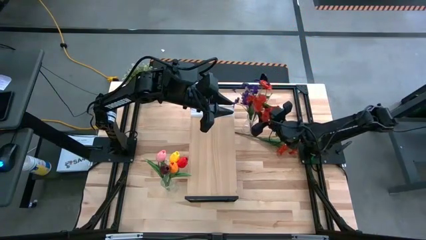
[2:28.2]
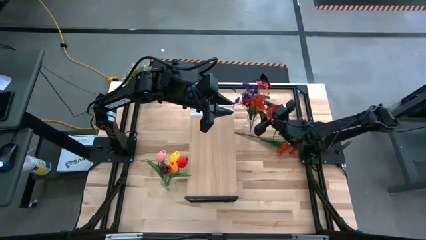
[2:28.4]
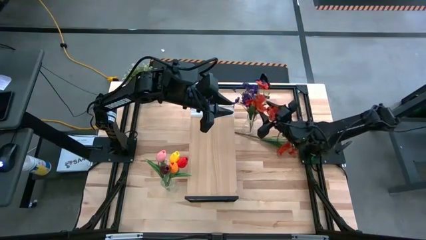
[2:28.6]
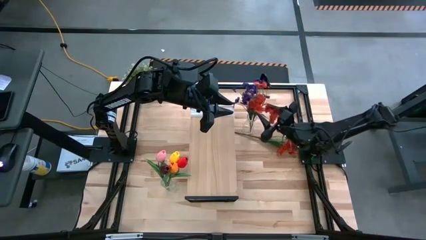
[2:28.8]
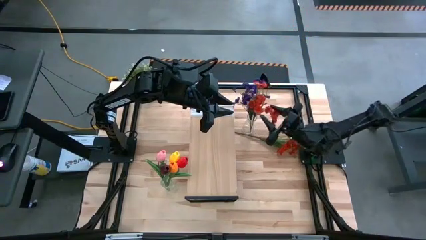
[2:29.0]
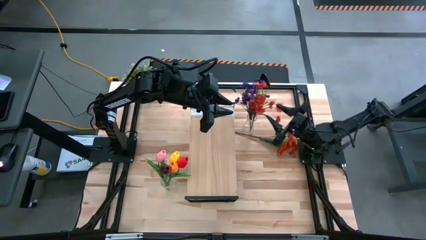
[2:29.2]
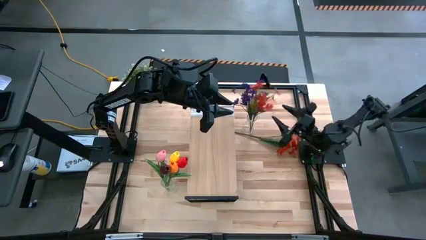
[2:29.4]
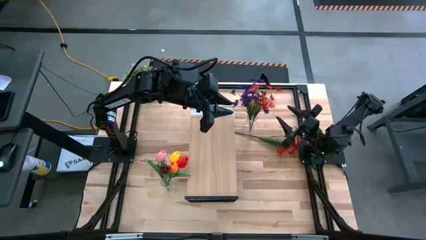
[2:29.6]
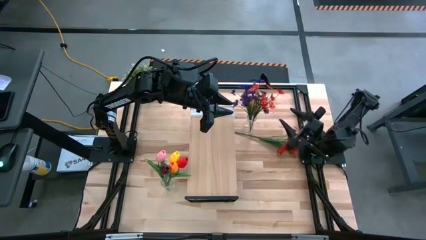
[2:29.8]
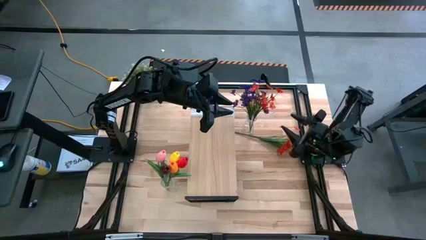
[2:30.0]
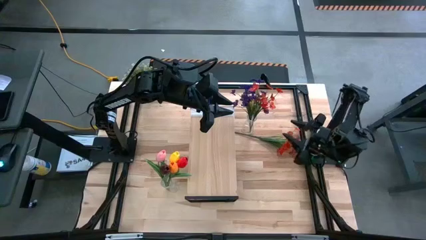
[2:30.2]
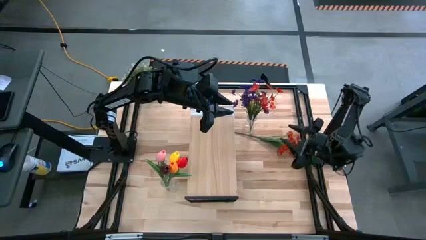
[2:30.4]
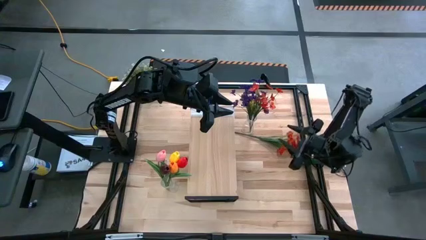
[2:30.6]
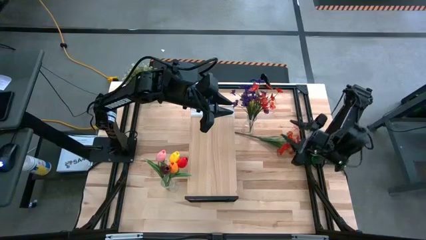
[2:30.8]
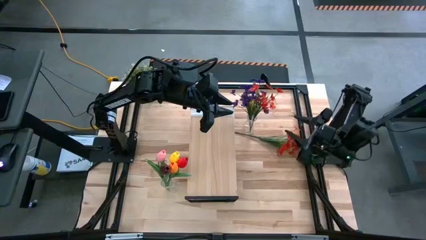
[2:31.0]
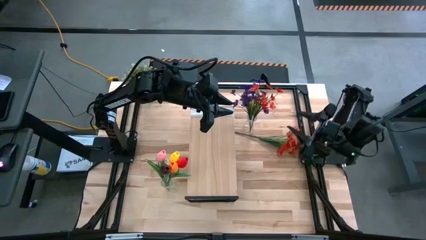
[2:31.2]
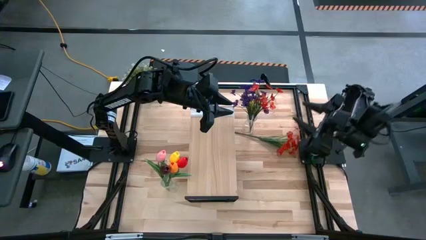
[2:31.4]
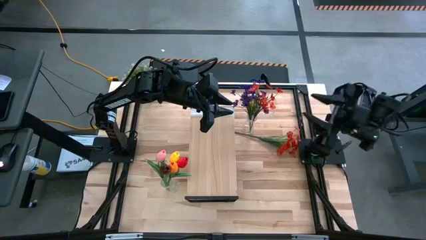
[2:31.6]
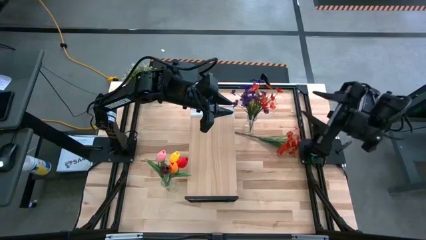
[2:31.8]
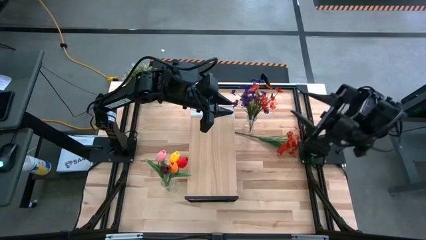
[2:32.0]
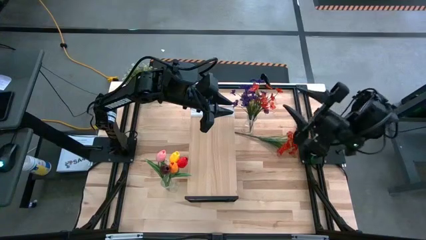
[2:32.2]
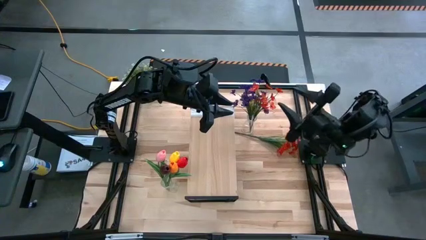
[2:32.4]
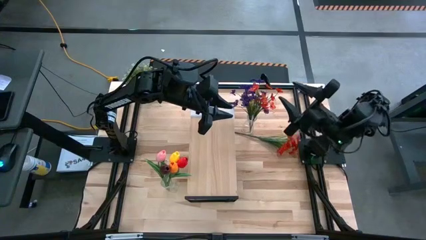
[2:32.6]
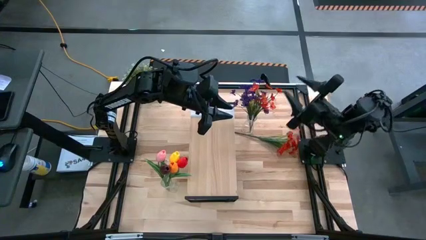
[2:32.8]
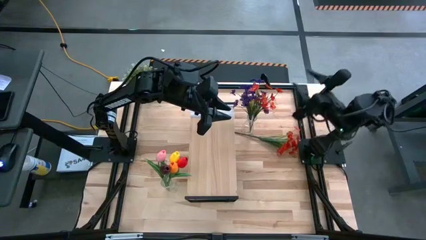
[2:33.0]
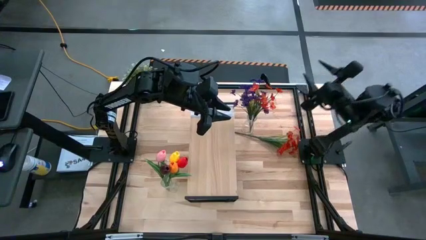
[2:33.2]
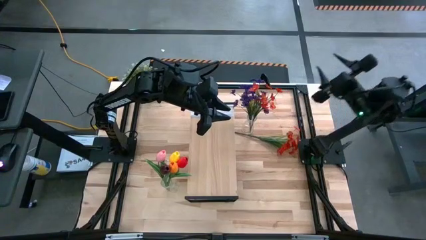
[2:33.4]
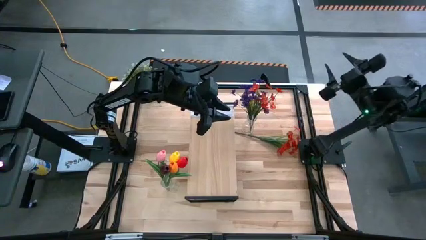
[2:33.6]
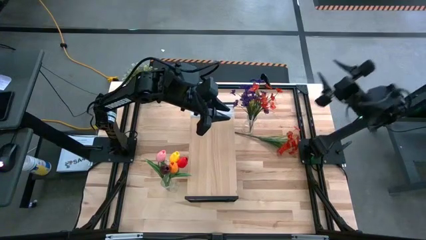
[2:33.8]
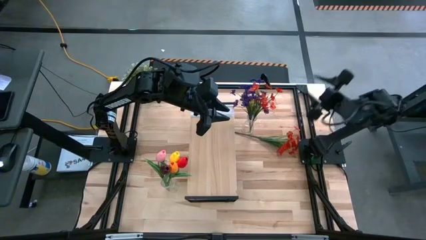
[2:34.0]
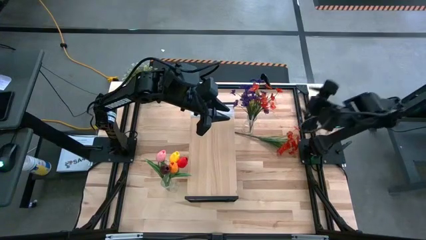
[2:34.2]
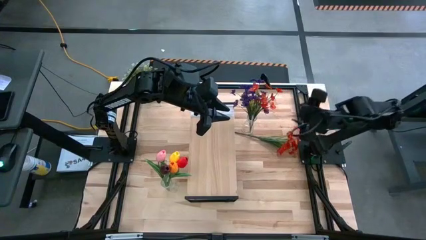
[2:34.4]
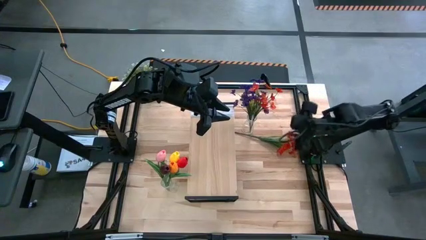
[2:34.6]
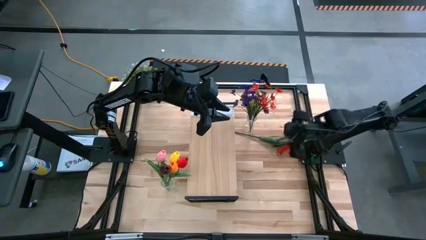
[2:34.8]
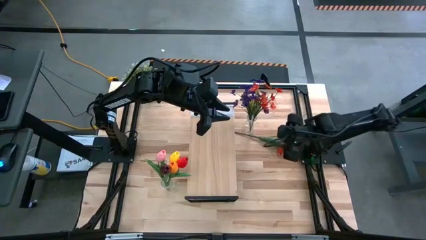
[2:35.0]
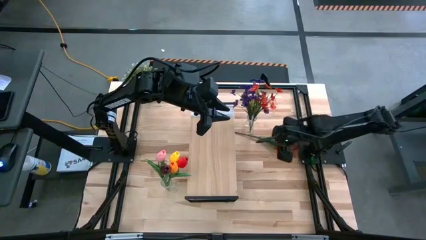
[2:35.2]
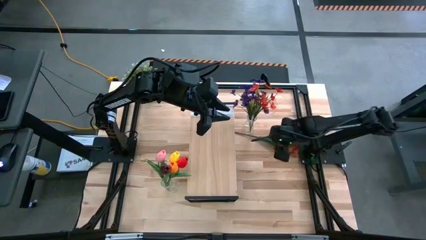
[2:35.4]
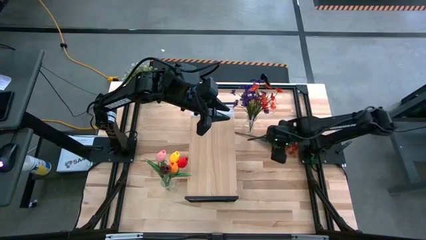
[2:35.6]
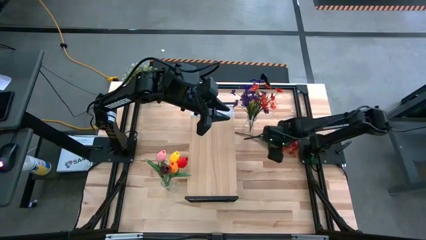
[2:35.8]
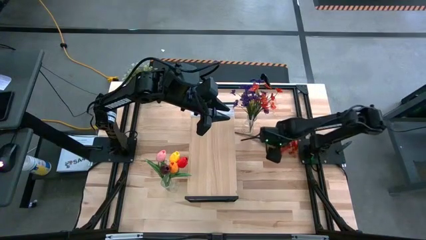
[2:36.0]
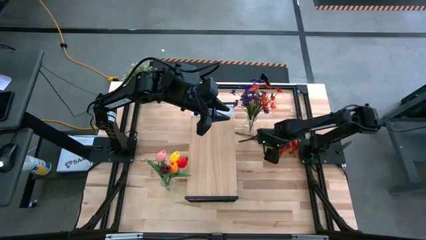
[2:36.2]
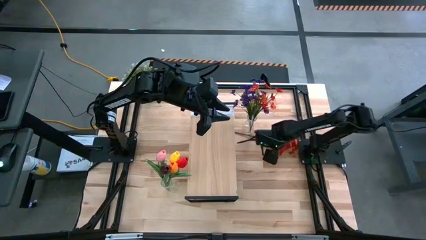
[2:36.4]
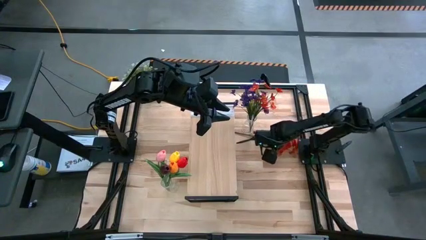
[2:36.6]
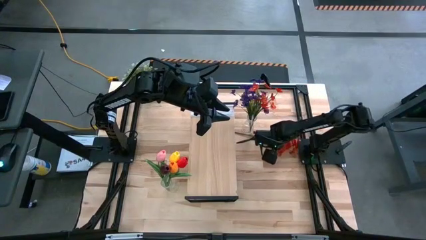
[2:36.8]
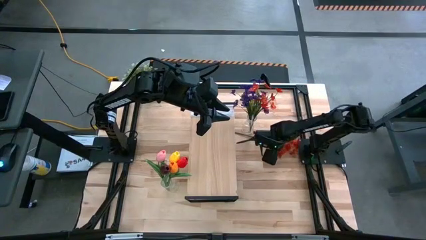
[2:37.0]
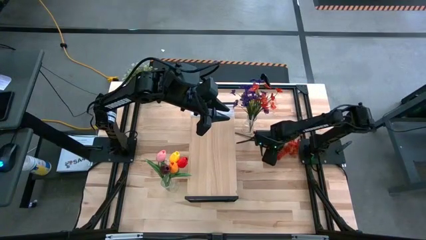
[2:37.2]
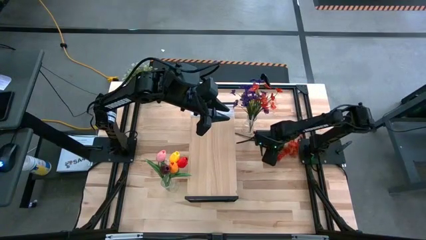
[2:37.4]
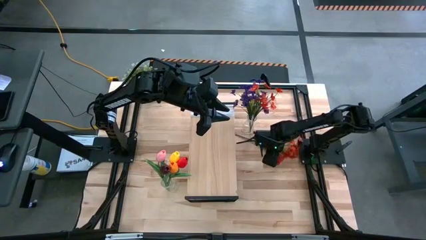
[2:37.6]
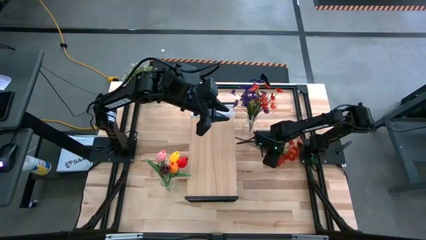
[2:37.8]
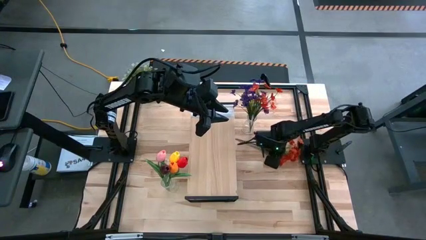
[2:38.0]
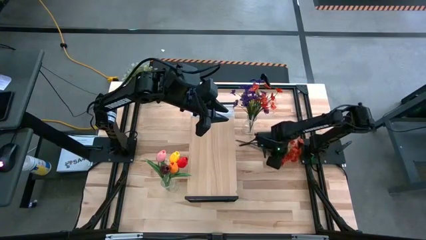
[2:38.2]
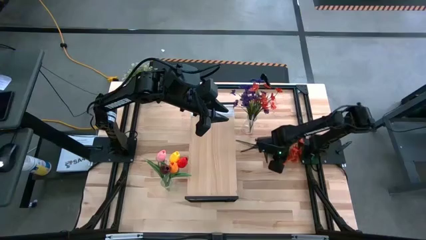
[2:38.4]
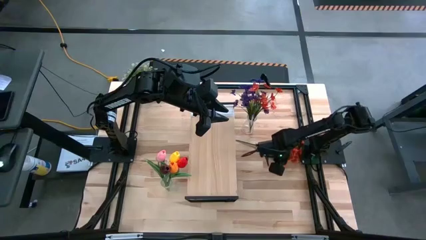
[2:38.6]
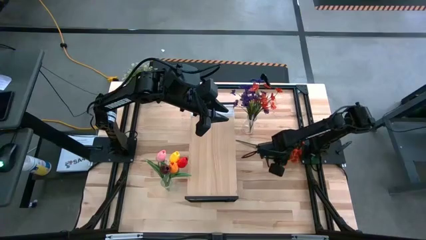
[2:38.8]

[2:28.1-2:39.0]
Task: Pick and place flowers into a vace then onto a shelf
Put the red flowers into the top vase

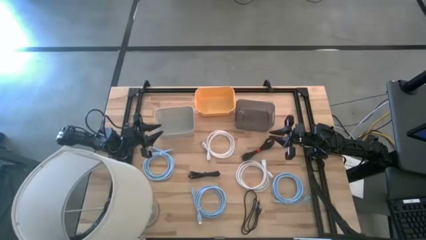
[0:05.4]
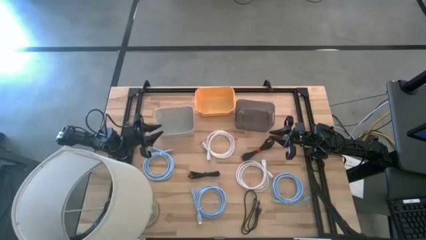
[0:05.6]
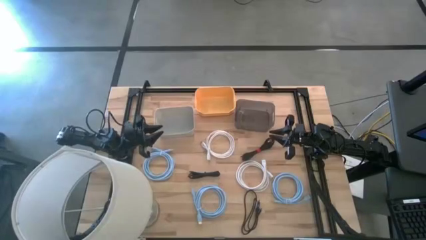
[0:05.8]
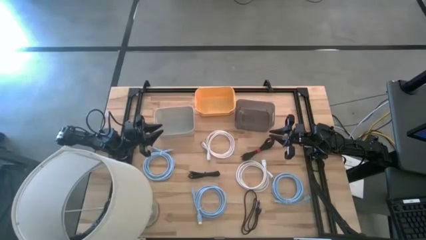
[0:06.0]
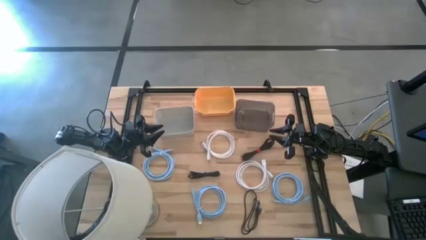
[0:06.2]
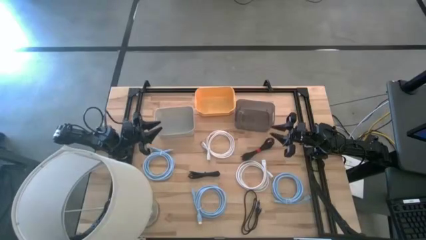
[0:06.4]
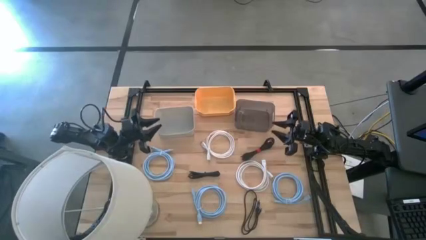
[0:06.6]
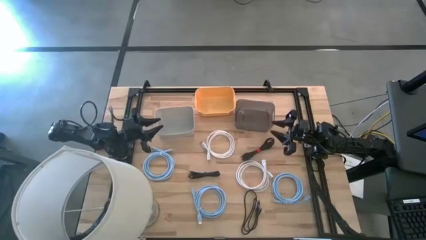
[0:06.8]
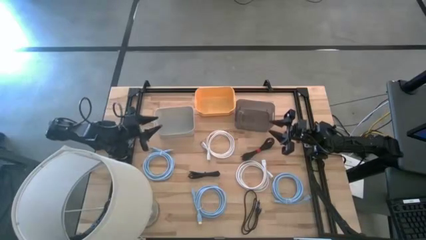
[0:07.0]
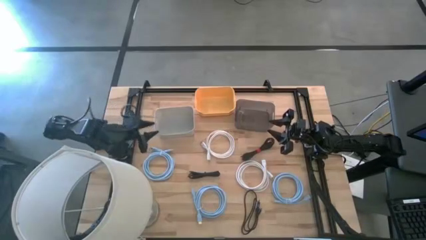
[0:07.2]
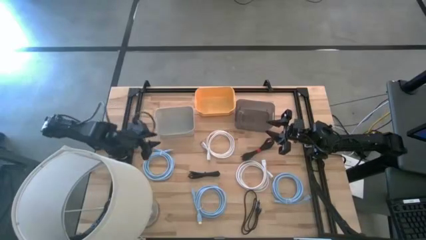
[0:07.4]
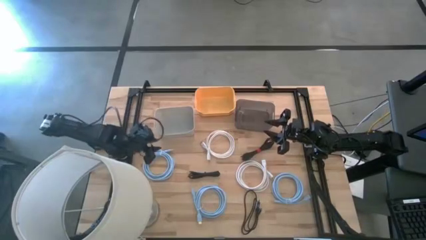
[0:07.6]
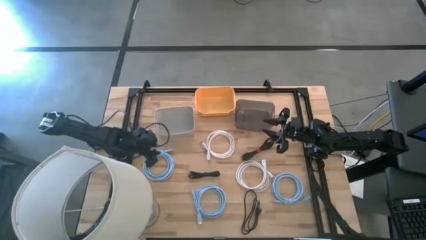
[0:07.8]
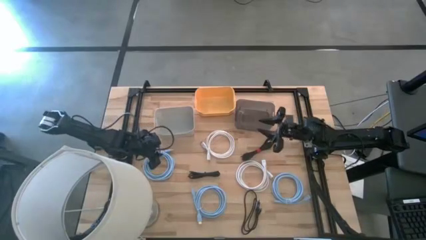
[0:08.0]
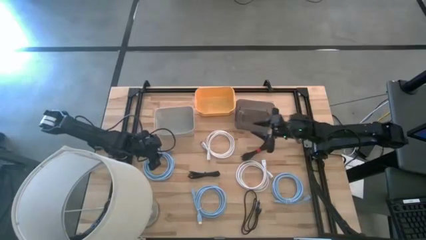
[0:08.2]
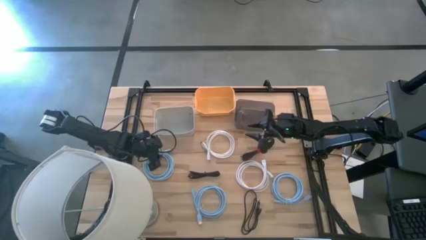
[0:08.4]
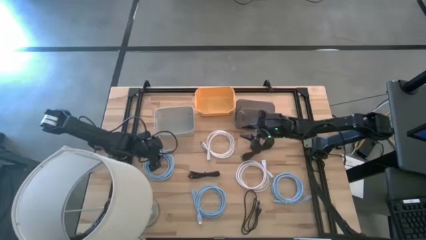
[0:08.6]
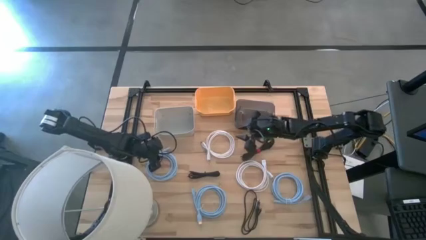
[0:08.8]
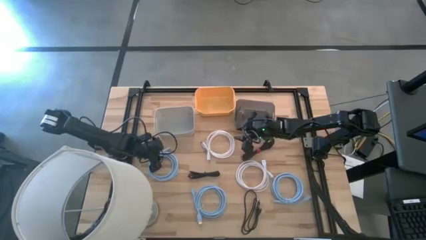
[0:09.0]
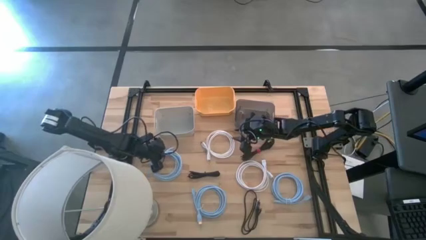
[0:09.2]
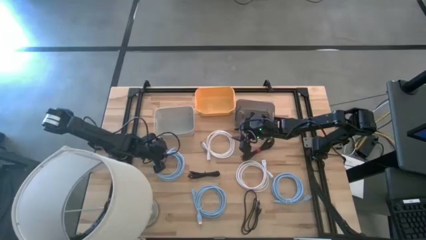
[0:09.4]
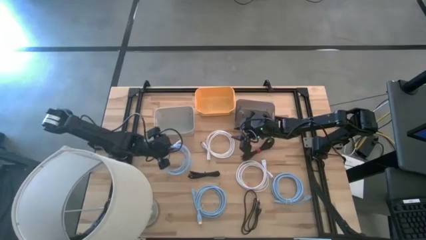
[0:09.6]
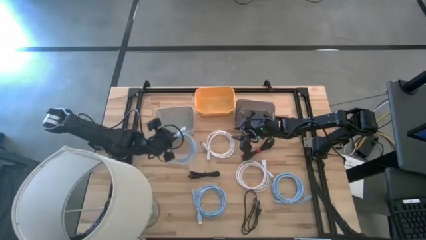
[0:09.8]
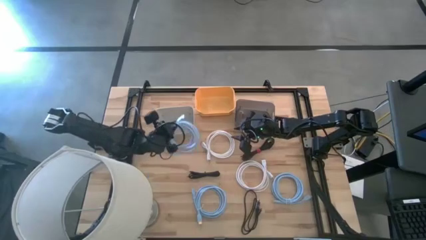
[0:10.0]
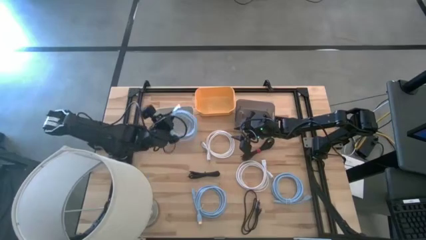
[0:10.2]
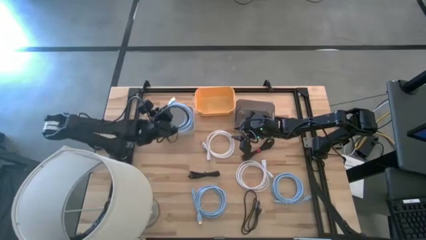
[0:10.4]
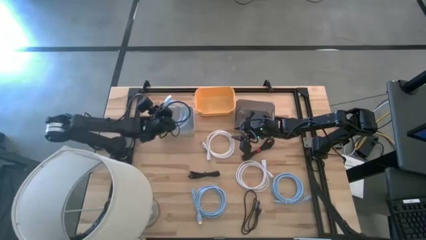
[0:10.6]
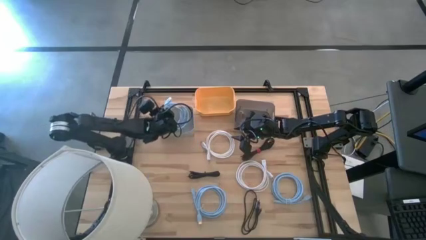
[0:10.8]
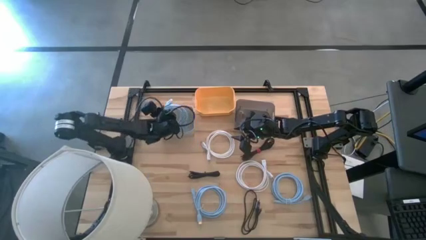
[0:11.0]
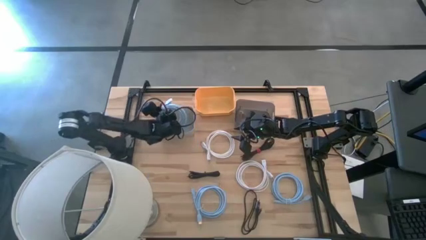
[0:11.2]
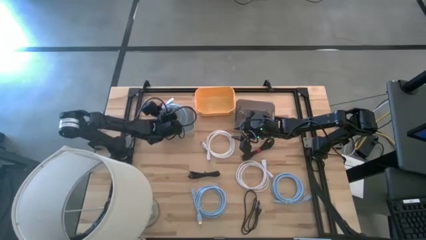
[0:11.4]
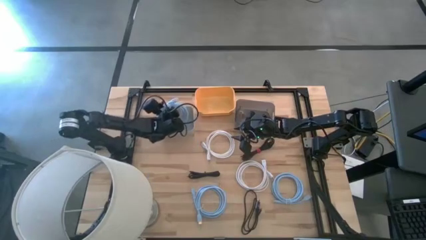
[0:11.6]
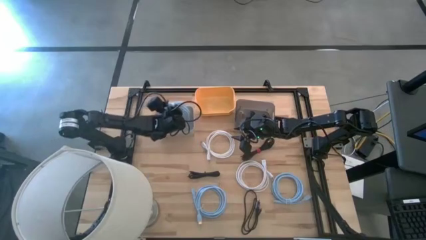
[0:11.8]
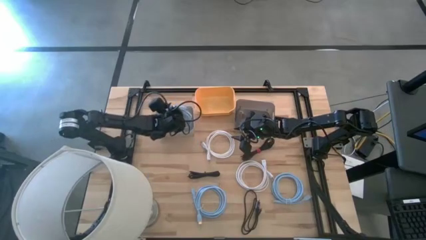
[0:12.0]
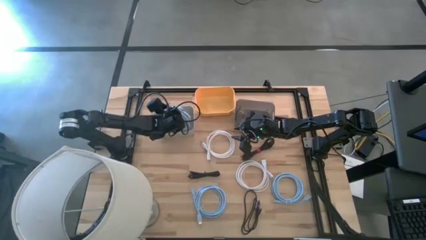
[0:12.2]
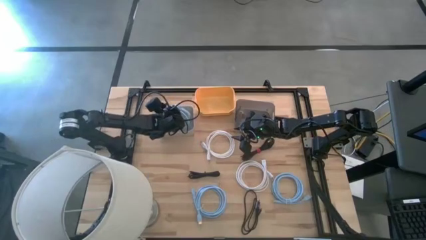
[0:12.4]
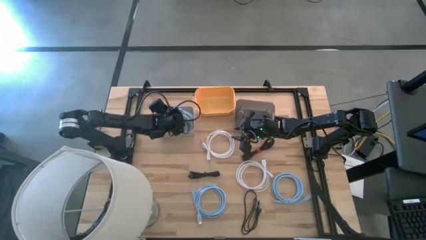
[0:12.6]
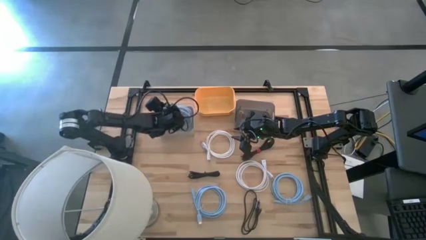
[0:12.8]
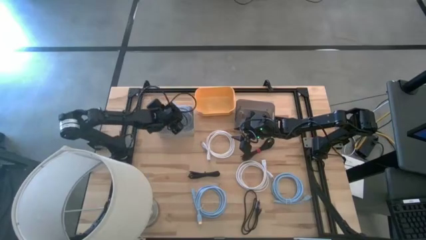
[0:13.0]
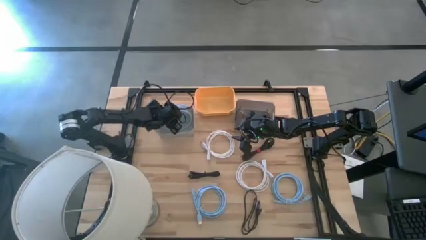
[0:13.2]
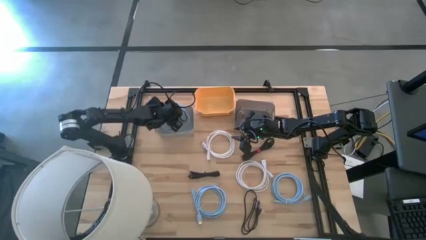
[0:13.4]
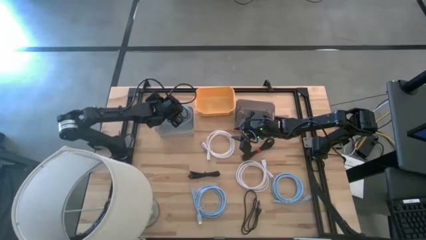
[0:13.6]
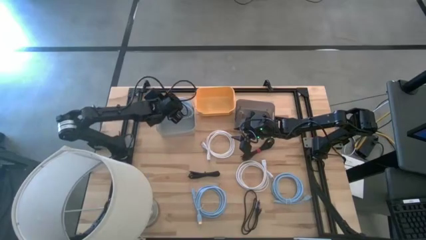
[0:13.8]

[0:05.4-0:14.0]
Task: Pick & Place USB Port
Put the top left light blue hdmi cable into the gray bin
